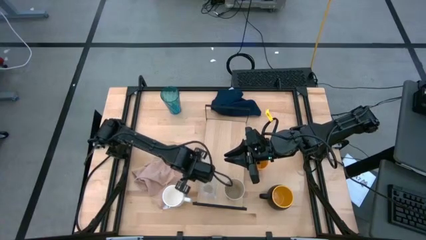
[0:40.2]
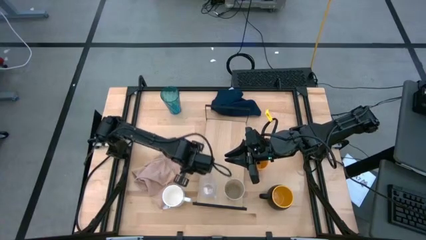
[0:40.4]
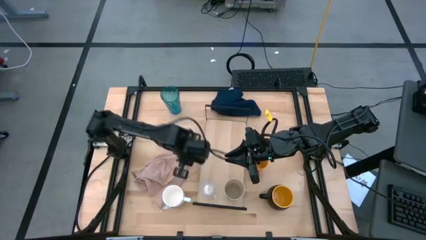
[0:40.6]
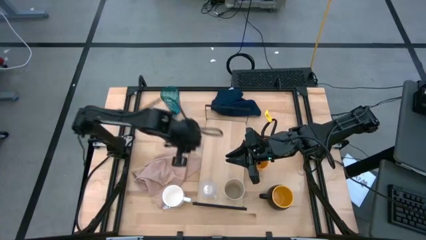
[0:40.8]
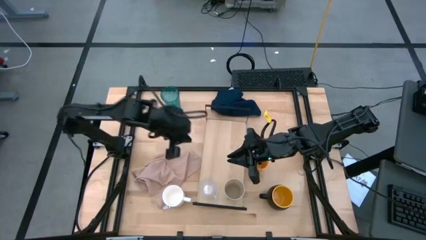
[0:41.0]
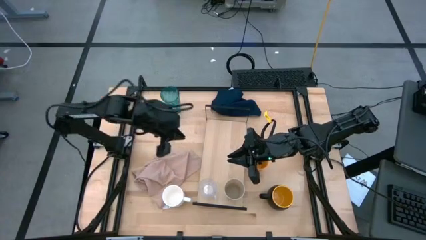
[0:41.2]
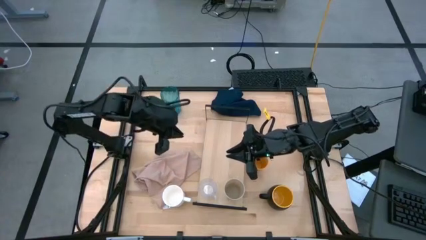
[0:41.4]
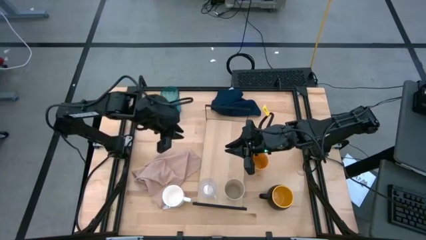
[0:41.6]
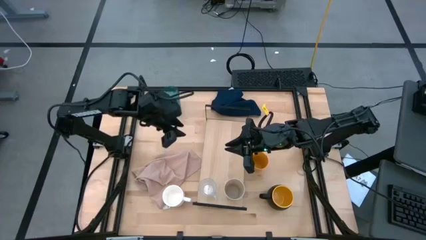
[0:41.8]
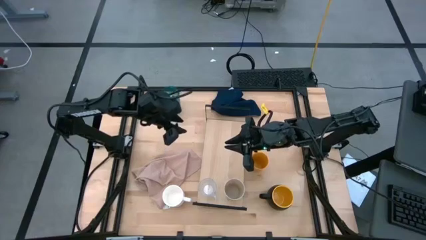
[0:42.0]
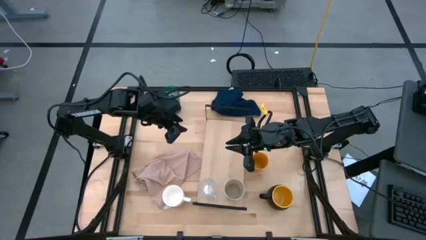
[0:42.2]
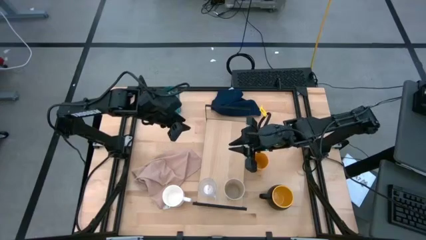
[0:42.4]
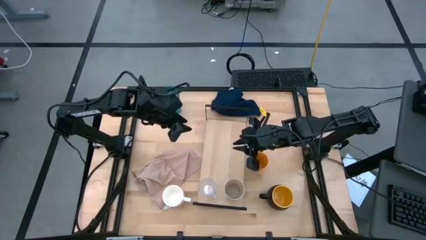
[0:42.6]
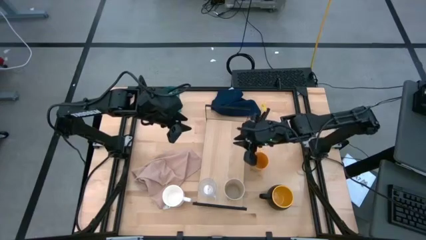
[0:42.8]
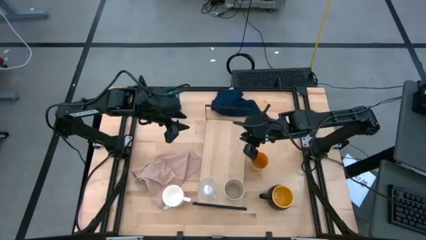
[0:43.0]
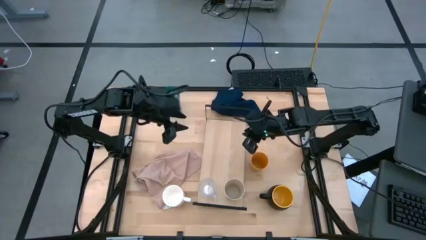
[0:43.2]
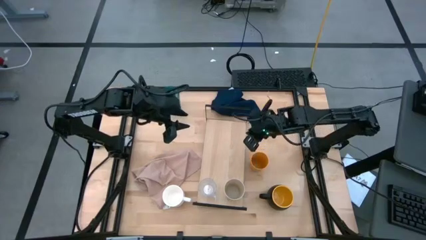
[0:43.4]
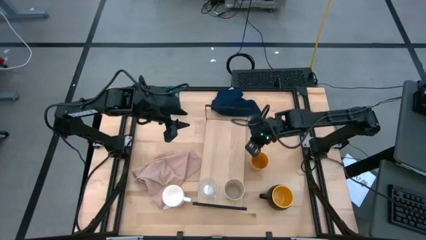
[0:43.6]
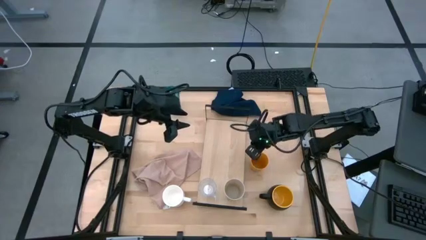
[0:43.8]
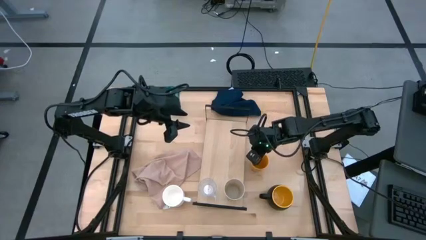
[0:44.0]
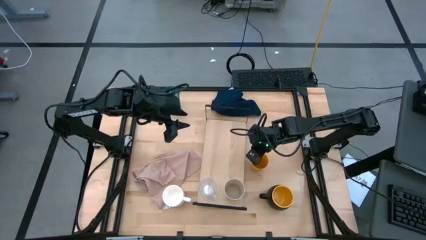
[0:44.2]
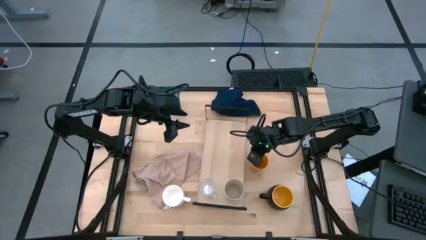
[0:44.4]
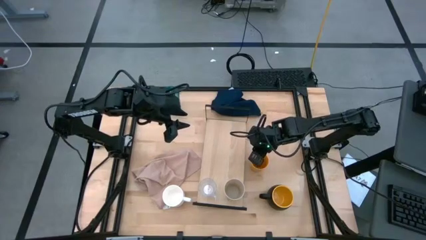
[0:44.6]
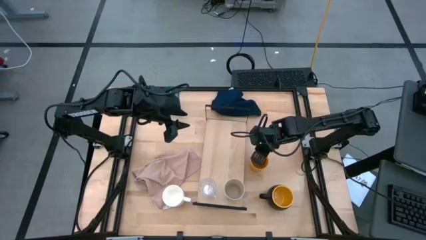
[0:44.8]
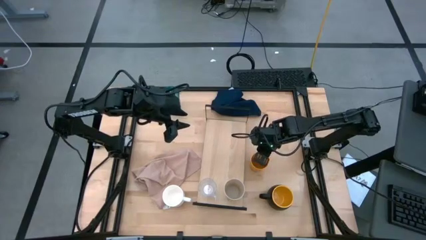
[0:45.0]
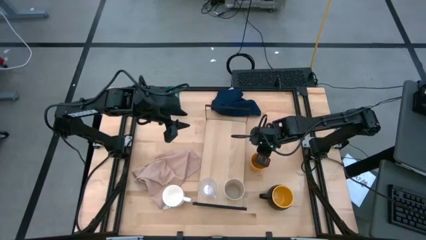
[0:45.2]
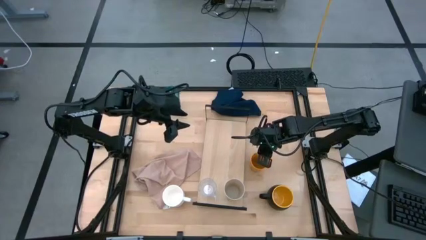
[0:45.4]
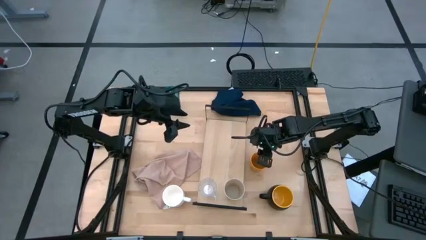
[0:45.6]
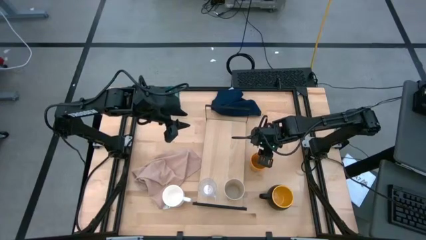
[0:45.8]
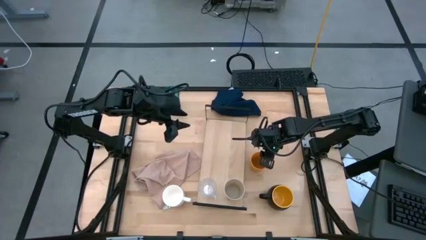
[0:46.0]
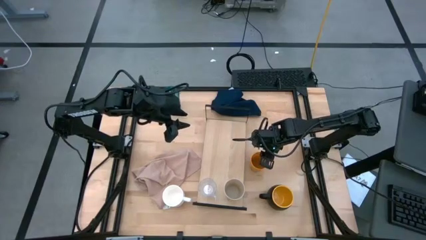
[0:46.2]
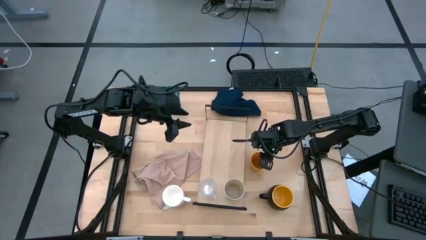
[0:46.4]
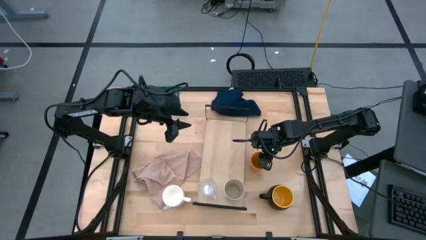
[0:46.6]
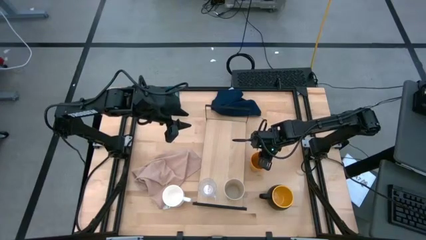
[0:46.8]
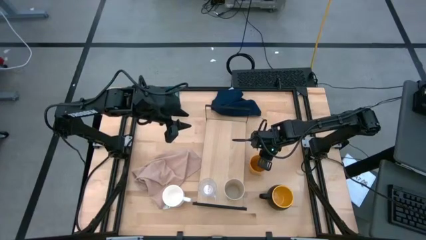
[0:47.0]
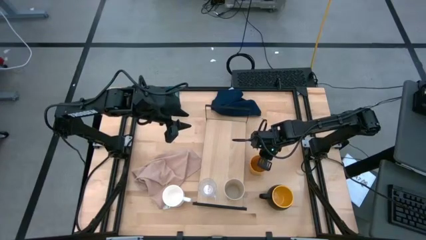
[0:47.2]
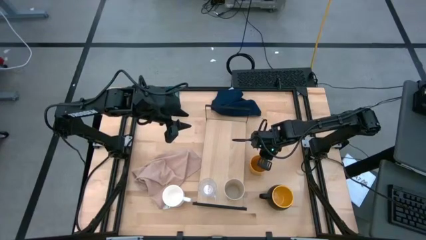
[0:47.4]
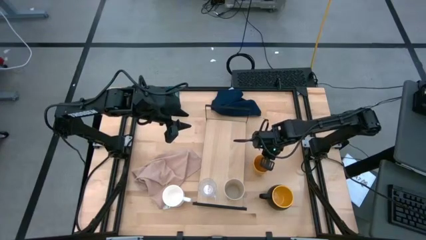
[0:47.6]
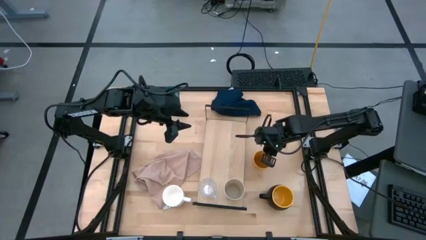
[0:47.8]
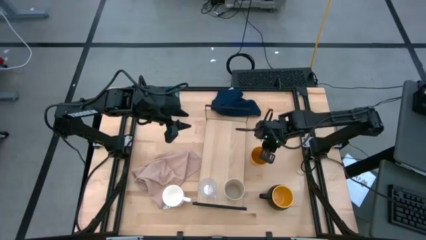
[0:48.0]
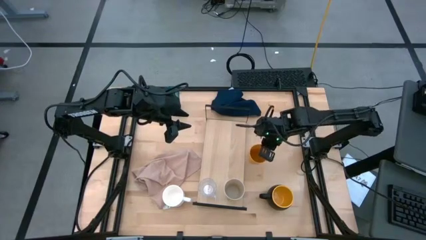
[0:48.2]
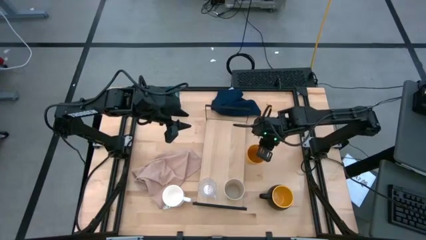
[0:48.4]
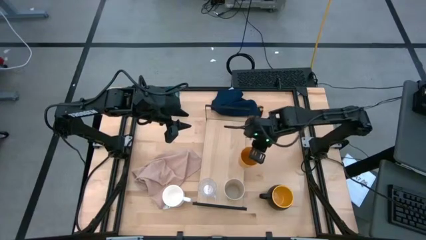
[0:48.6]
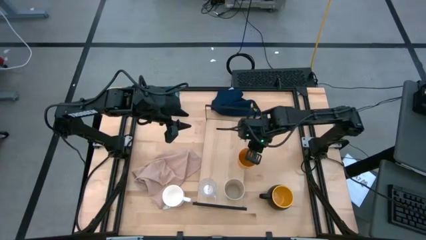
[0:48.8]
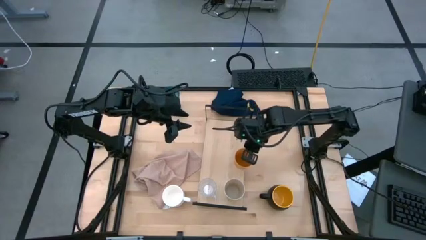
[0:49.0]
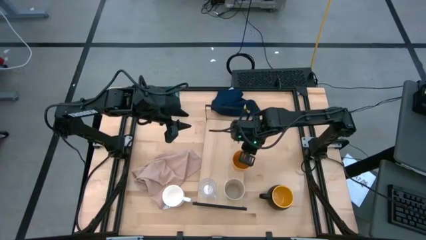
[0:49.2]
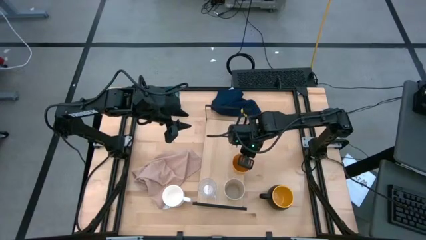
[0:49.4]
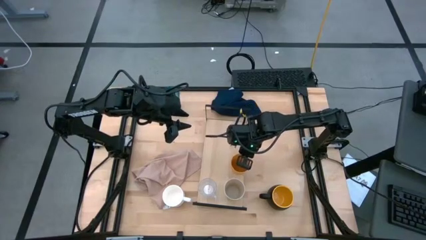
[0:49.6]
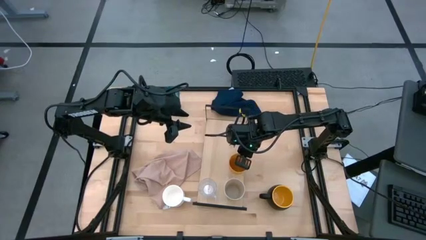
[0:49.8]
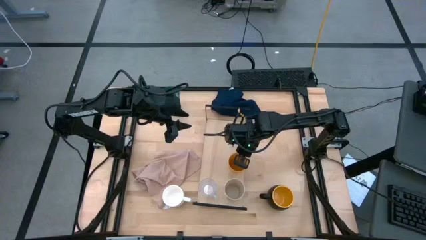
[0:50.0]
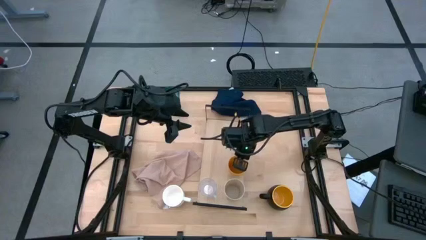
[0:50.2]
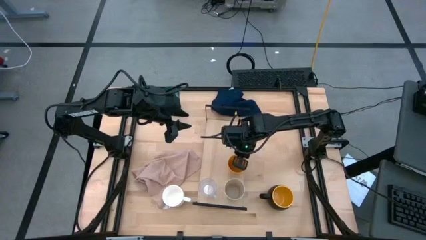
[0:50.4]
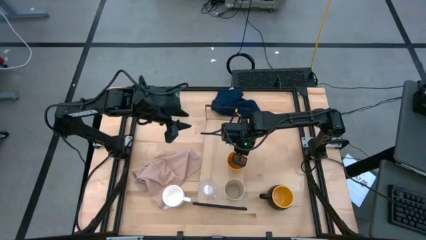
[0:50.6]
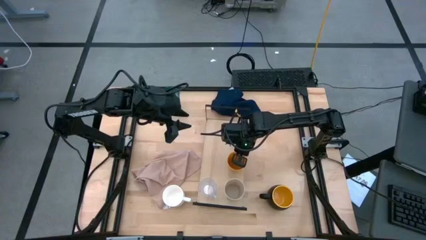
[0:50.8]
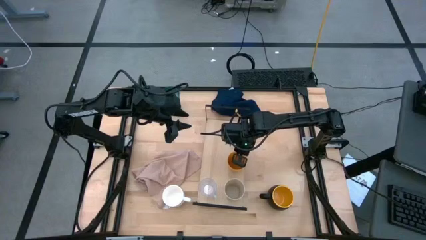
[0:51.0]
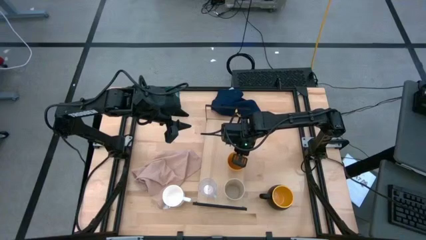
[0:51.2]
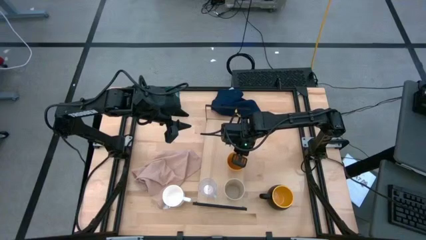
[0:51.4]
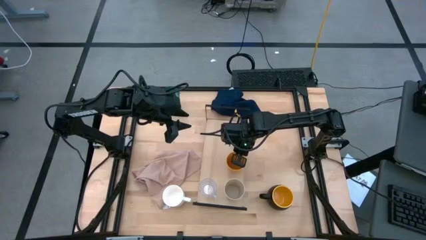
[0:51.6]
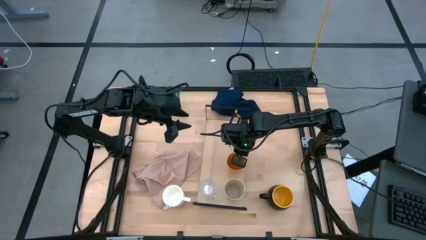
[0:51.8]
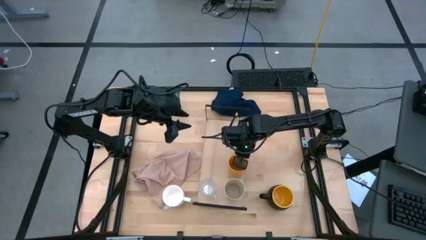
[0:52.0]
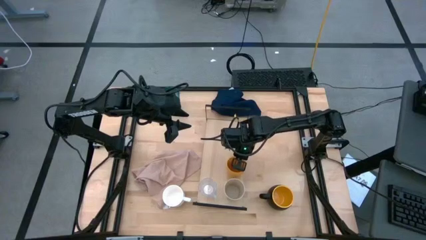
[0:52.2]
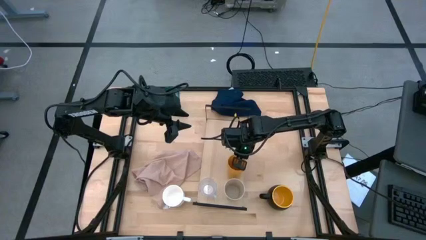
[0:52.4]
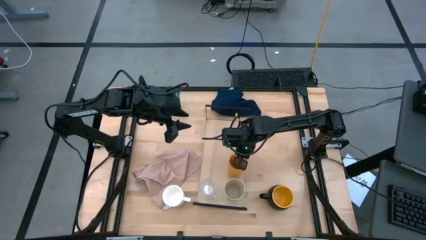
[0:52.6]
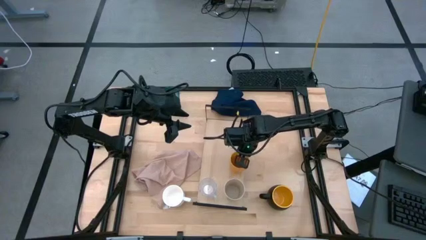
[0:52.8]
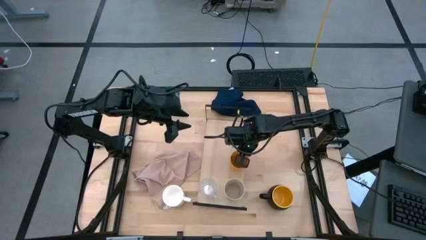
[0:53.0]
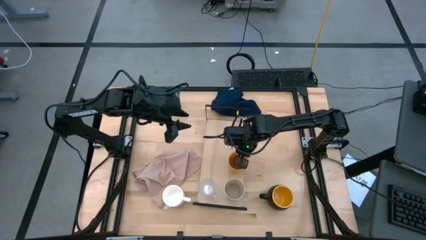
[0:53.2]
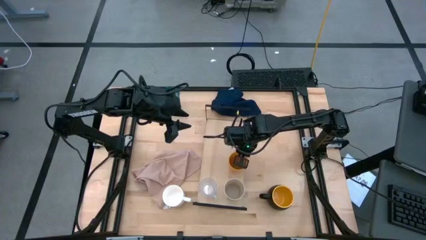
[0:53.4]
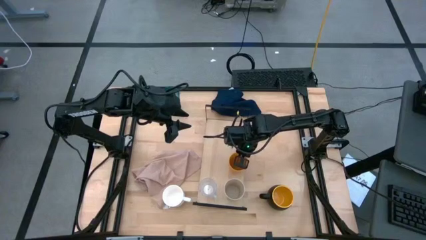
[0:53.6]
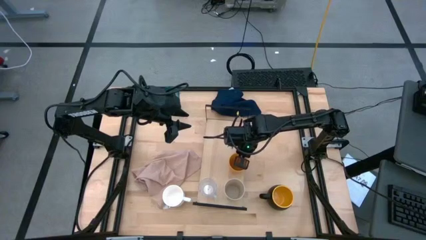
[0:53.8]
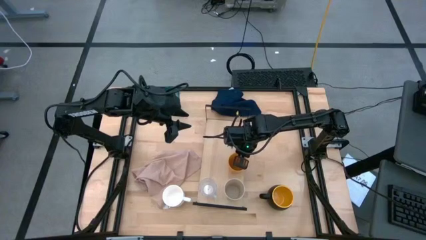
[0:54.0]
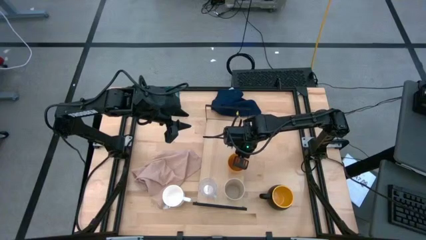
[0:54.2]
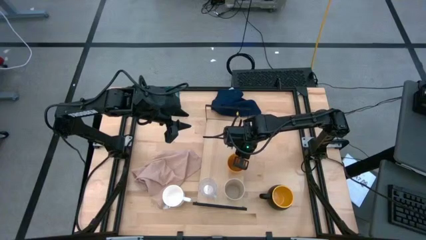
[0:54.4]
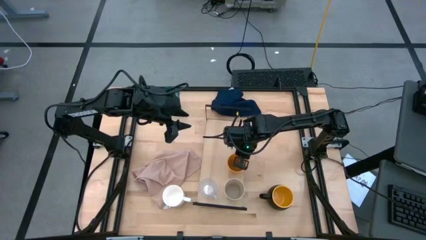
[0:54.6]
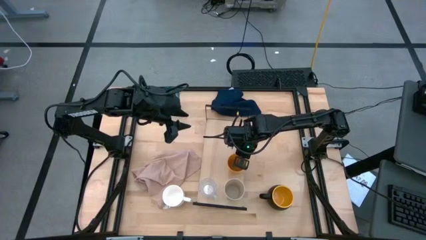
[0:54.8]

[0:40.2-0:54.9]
Task: Stack small to large cups/mugs on shelf
Put the yellow cup on the shelf aligned with the white cup

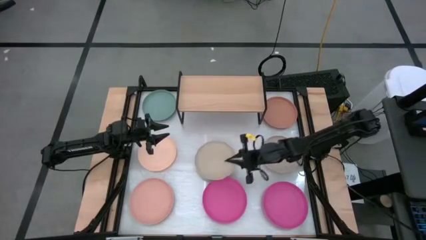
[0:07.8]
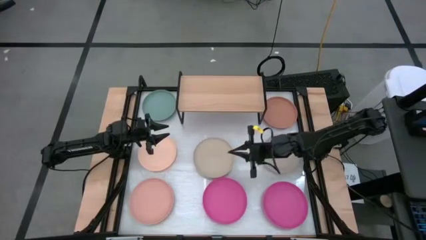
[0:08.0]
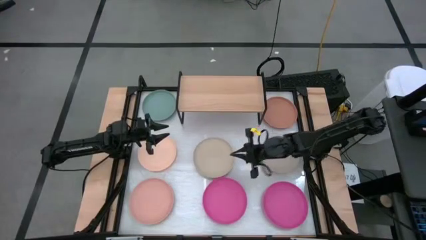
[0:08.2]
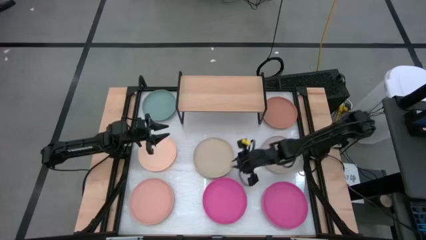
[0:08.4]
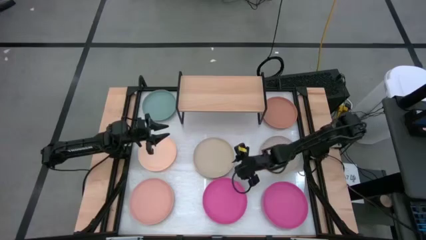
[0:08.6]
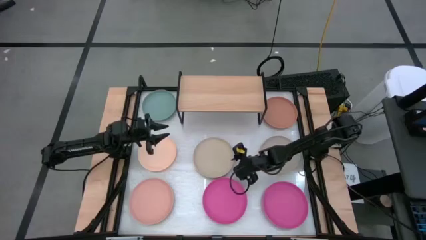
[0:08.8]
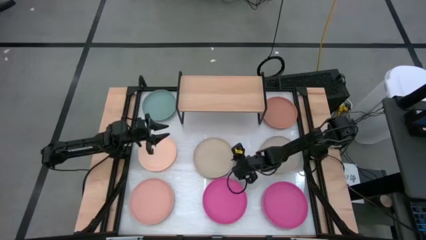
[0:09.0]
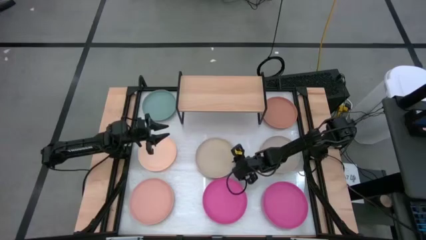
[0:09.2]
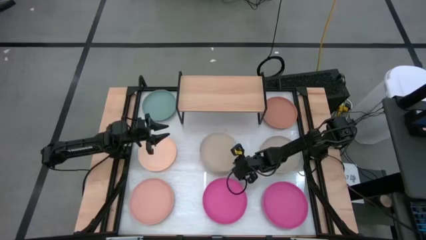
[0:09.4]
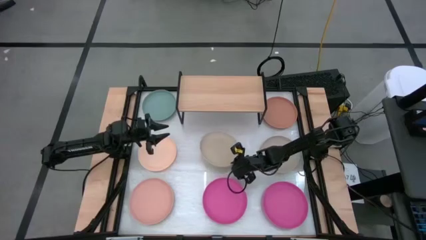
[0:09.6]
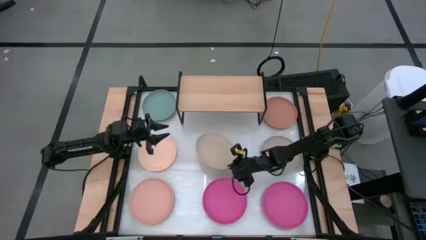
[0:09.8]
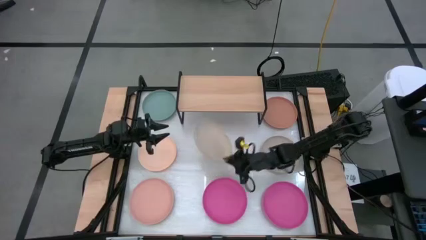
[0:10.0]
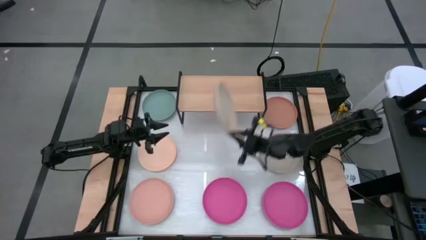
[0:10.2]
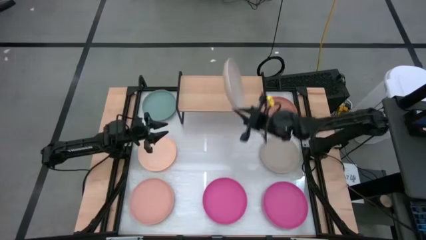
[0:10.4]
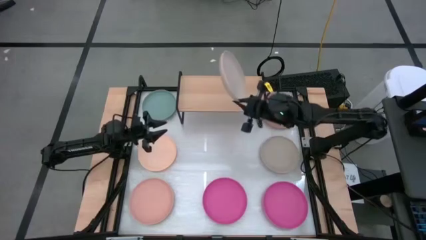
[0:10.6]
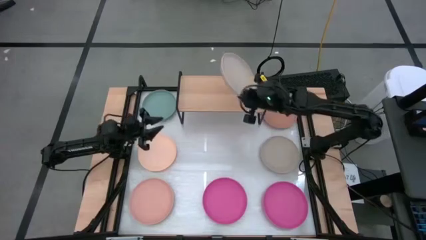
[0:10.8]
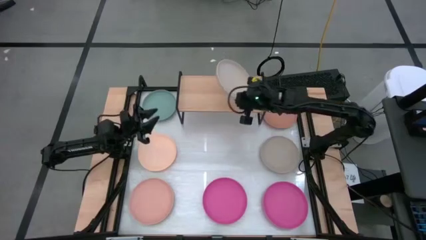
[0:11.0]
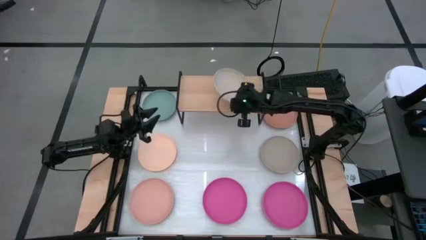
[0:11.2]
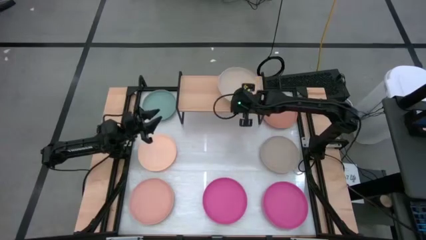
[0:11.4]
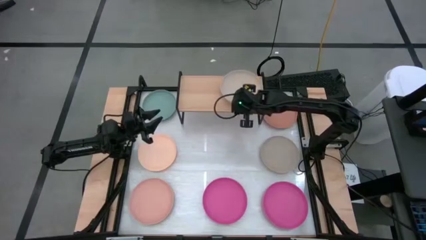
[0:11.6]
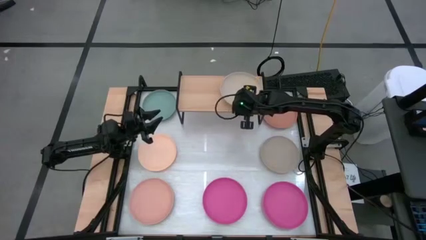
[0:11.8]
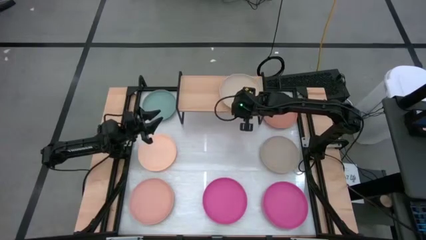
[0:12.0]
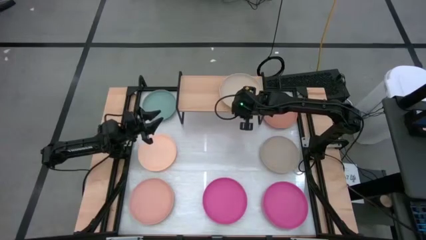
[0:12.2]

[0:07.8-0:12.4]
Task: Place and stack plates onto a shelf
Put the light brown plate on the shelf
